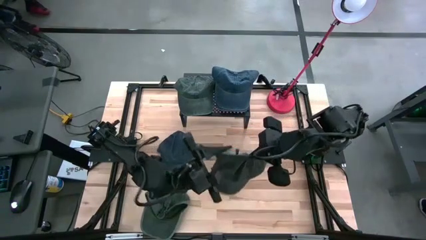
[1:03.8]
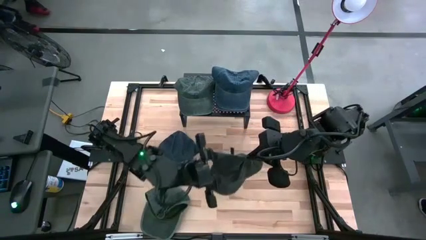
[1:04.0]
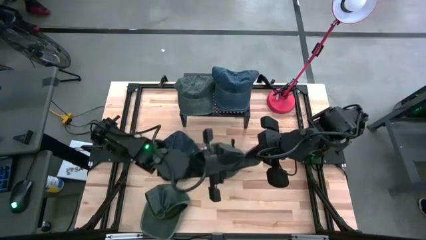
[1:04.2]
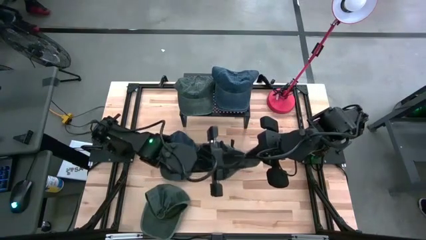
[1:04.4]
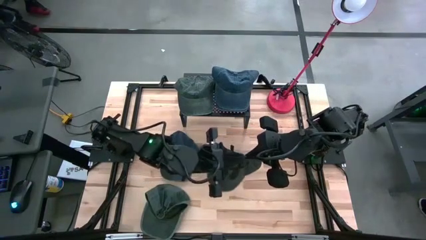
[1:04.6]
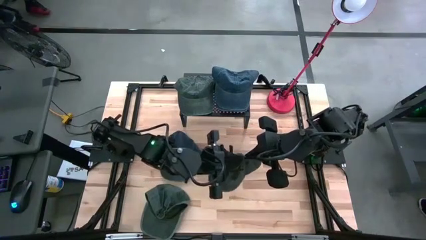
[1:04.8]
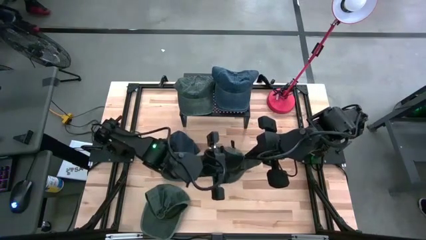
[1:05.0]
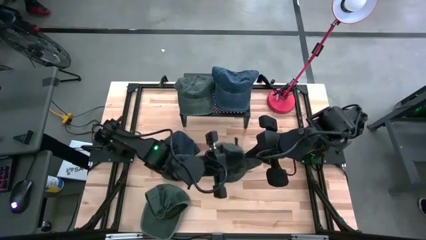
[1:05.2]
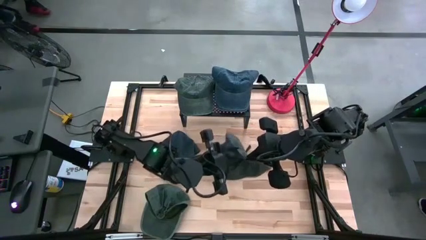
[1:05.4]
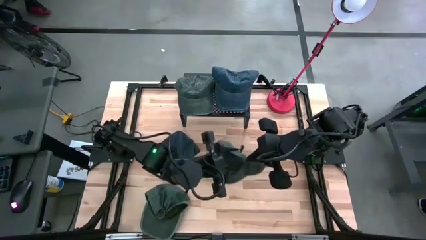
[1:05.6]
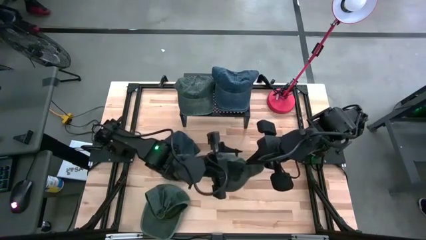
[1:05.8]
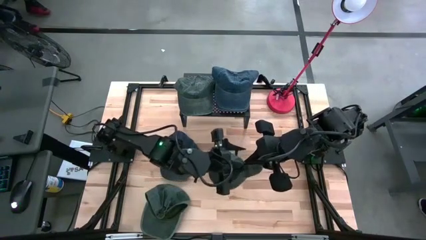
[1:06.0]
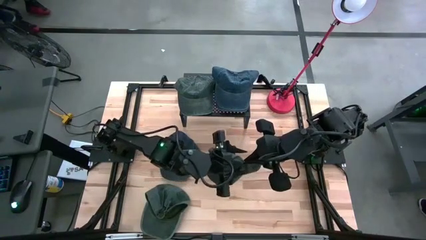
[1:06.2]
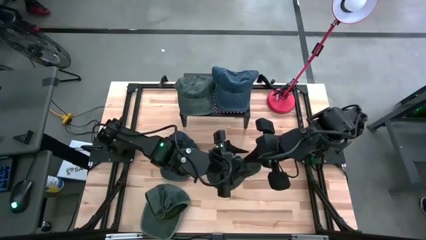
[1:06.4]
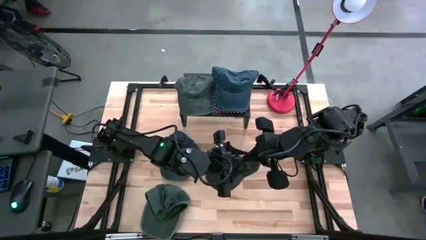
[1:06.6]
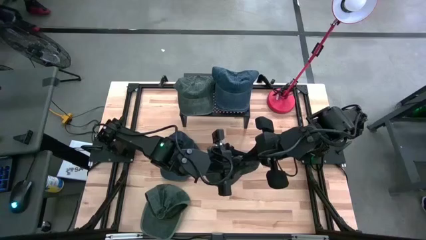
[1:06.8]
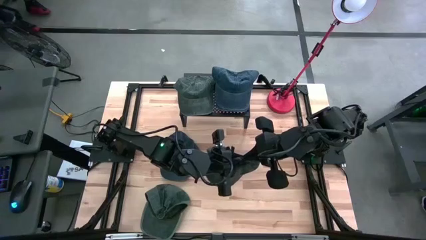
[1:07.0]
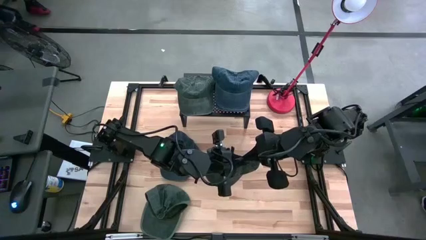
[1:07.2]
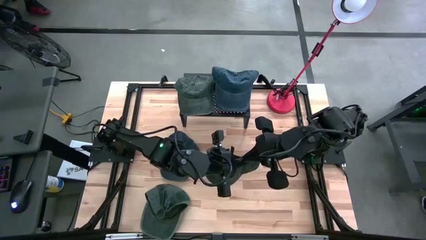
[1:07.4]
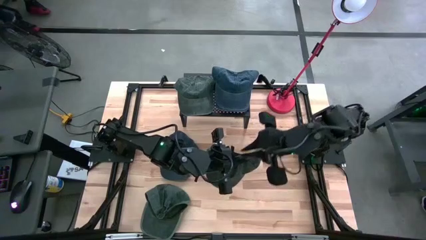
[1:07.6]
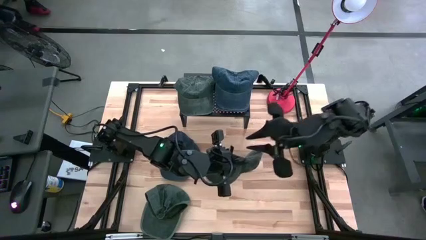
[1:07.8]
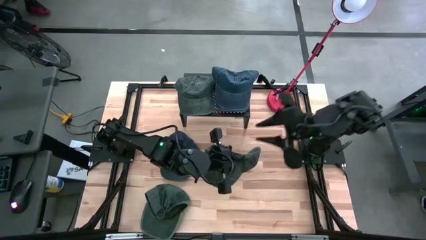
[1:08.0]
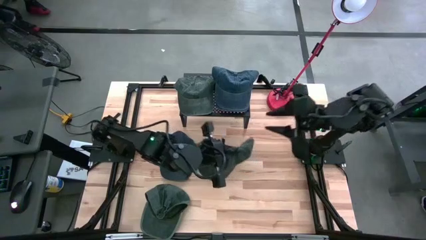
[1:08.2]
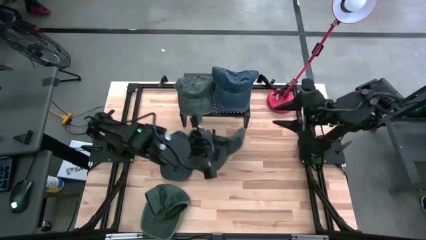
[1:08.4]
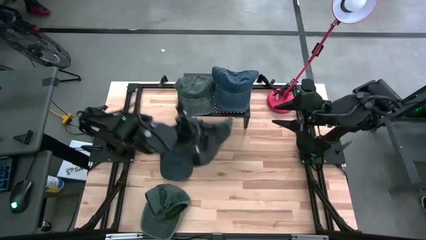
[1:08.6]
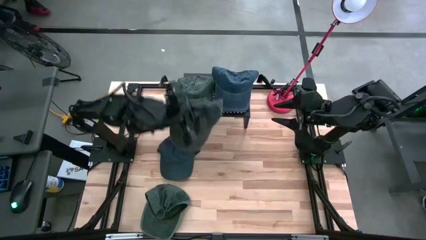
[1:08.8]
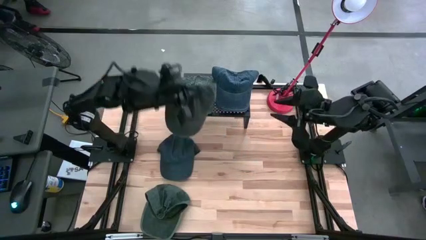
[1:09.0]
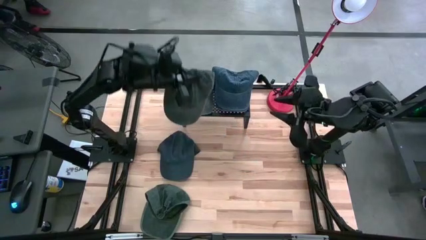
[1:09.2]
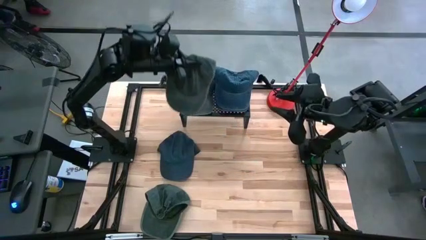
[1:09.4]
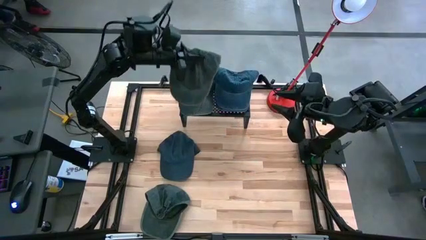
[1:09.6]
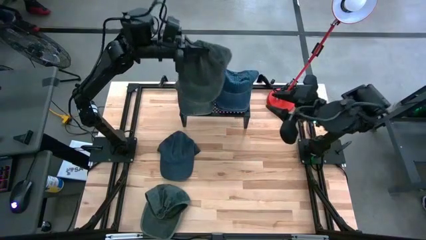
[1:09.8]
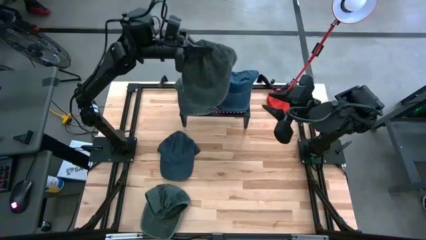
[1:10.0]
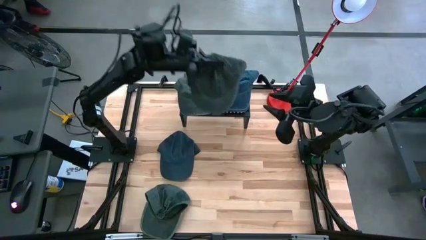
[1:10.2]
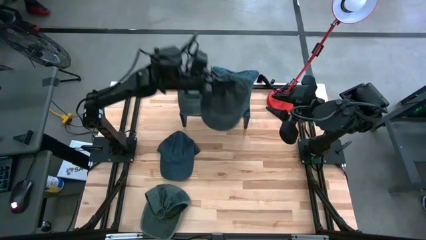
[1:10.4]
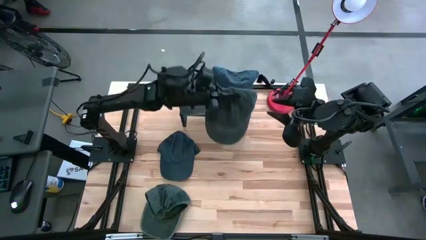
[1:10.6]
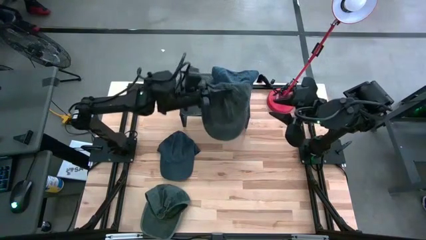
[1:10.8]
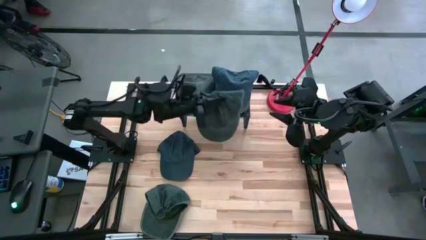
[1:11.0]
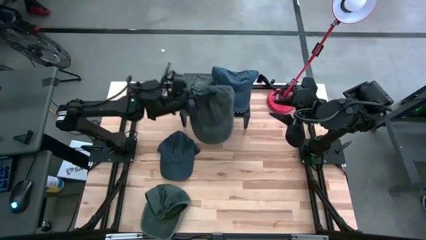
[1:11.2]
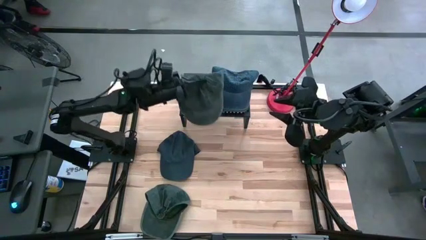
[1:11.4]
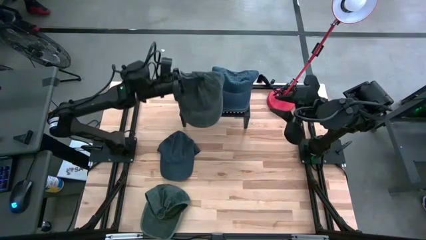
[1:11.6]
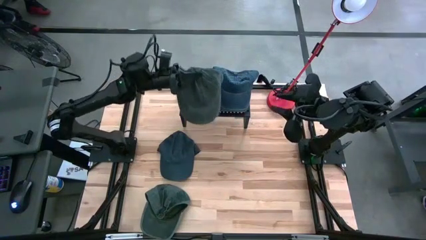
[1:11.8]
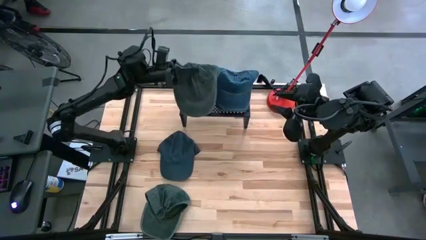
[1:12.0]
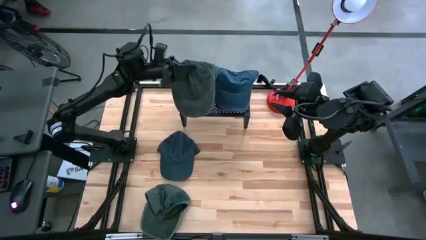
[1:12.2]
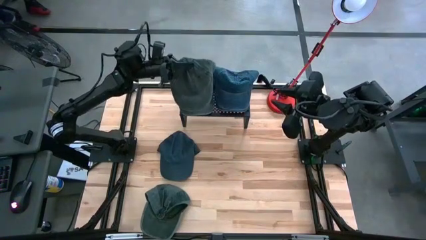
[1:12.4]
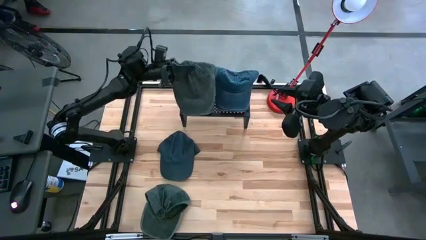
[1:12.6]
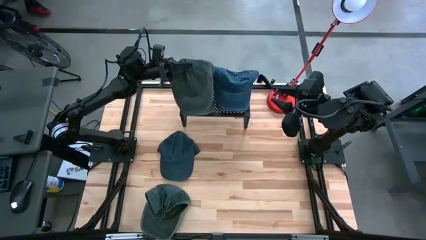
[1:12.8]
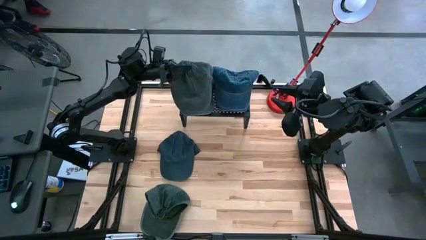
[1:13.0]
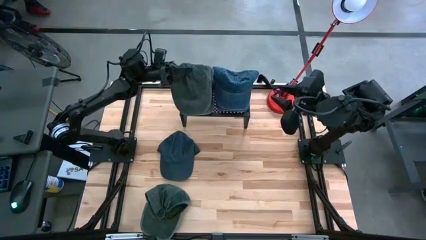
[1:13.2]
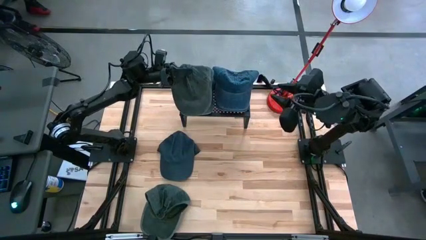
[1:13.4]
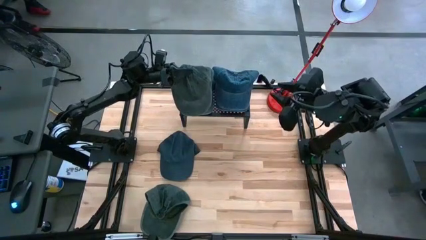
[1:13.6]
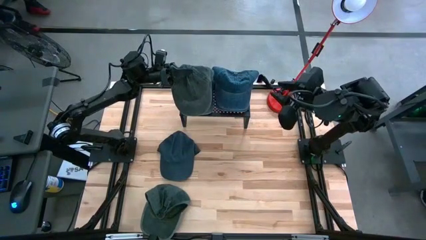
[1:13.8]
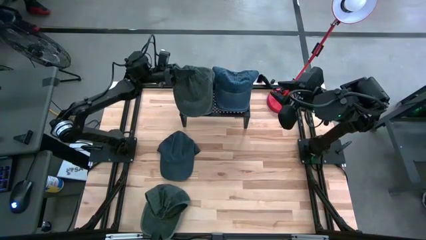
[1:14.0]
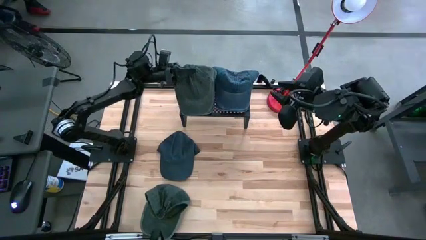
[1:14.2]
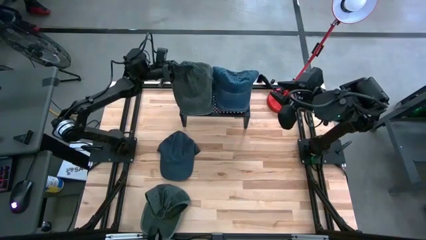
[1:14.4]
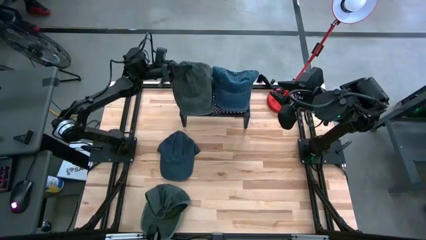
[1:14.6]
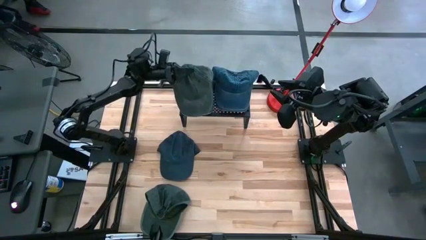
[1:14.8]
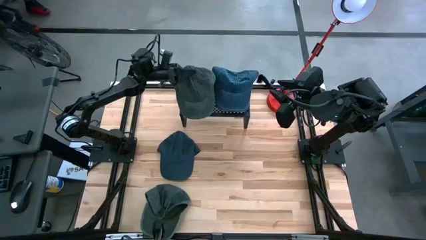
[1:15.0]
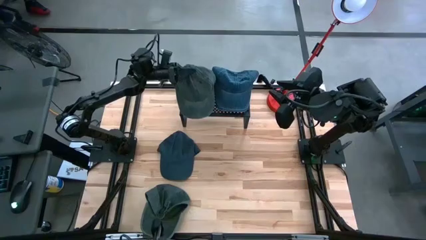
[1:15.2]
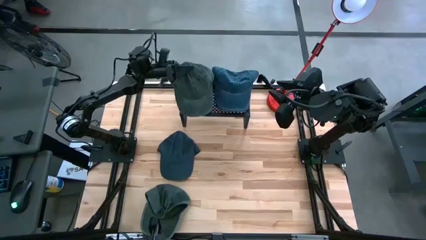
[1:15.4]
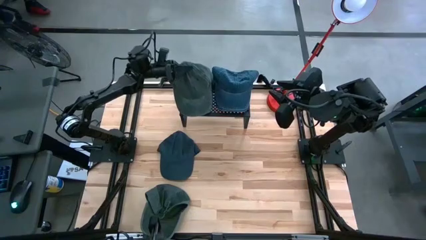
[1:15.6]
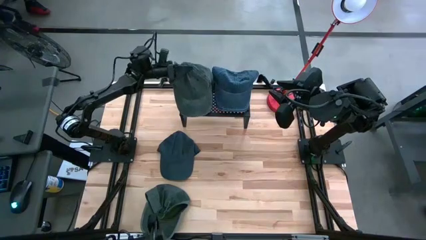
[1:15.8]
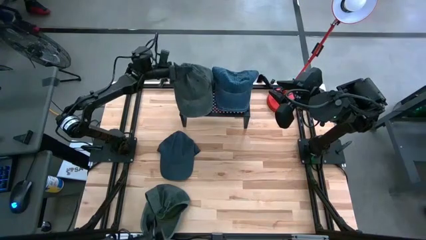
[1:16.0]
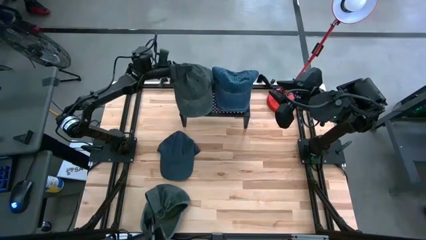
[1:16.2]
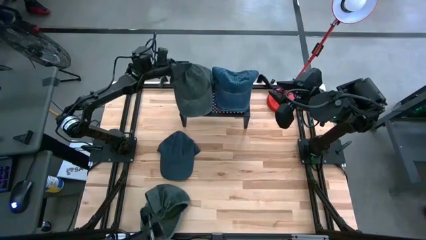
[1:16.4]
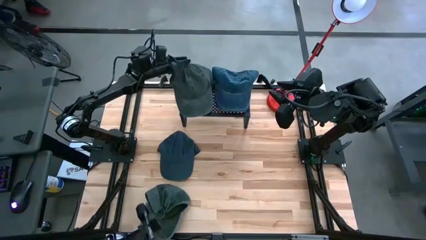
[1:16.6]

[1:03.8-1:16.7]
Task: Pick & Place hat
Stack the top dark green cap on top of the other dark green cap on the shelf
